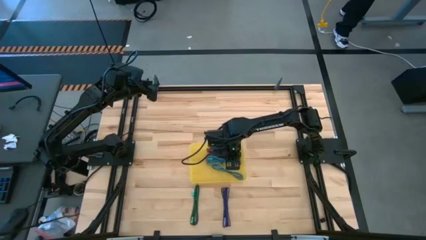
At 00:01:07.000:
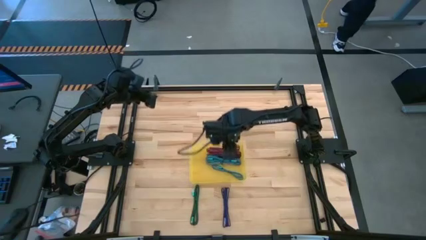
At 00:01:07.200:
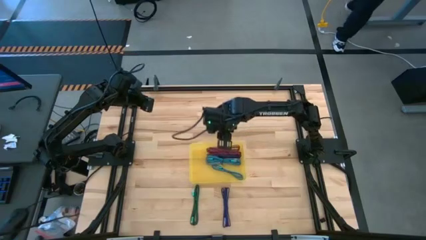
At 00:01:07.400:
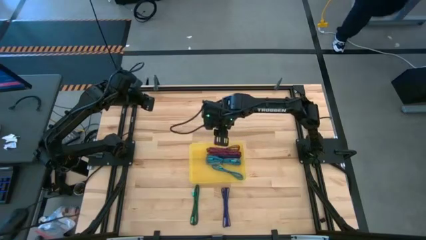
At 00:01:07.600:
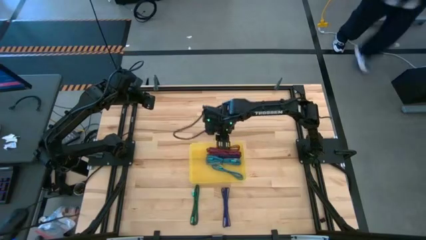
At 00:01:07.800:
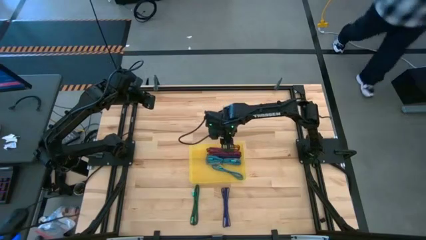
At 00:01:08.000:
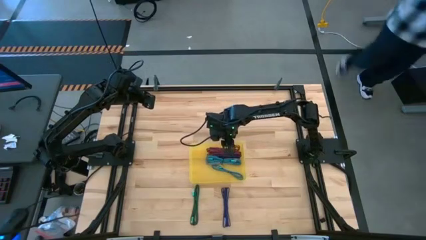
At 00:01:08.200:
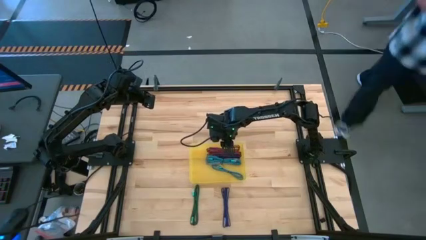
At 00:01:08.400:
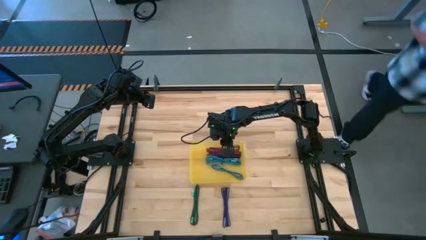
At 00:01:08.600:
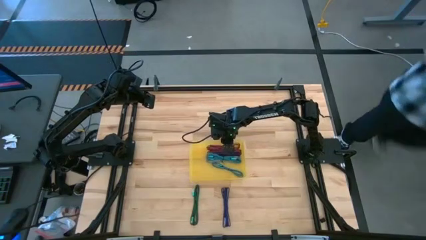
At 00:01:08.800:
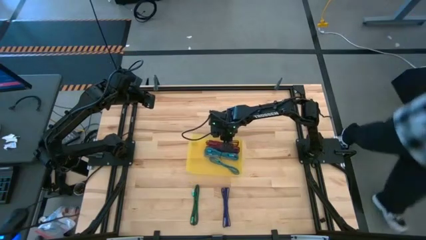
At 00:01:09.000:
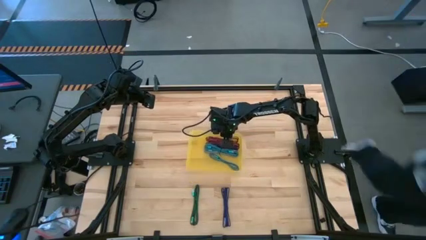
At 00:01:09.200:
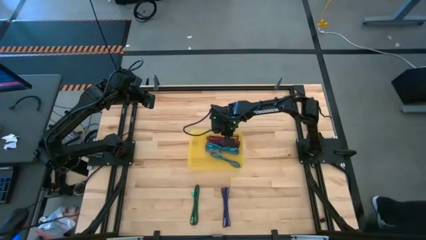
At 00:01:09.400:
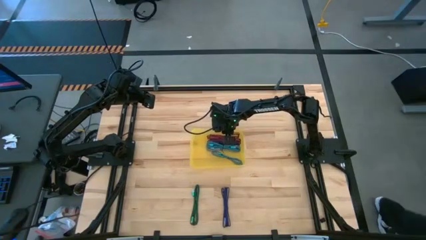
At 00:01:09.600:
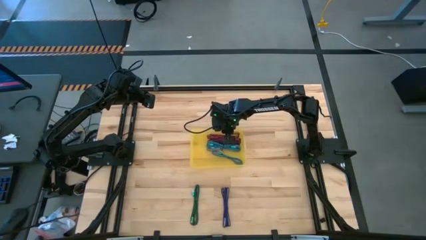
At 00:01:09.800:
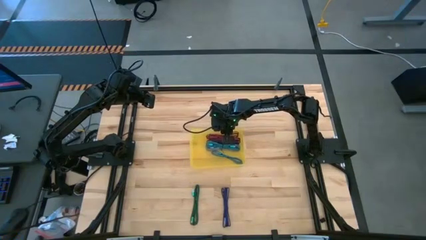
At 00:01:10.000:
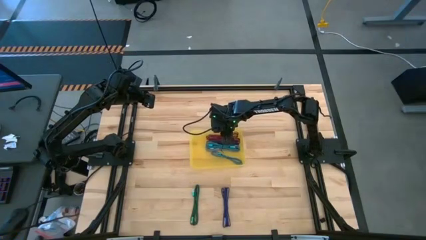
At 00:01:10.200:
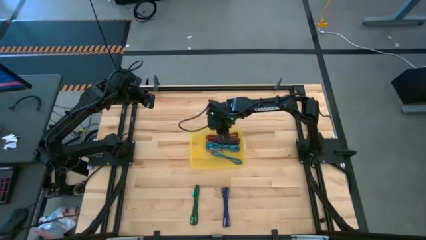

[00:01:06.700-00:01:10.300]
Task: Pick and place USB-C Cables
Adjust the yellow bin

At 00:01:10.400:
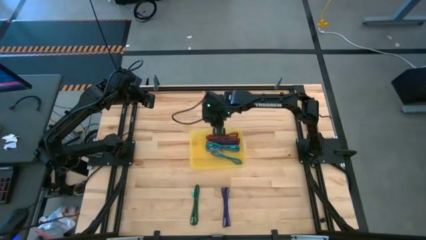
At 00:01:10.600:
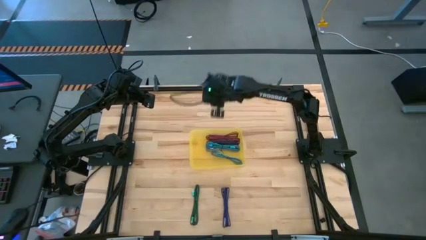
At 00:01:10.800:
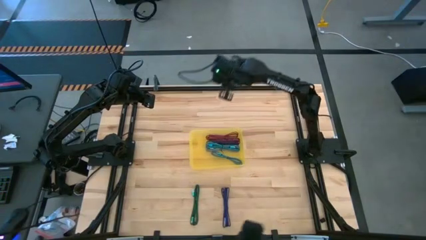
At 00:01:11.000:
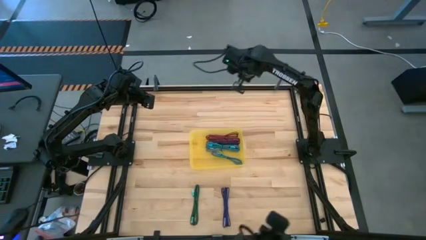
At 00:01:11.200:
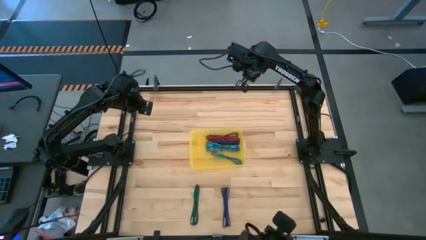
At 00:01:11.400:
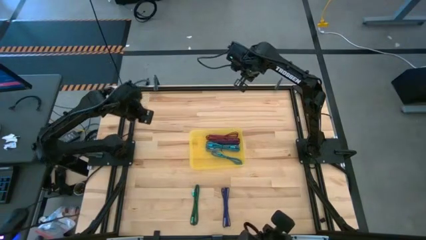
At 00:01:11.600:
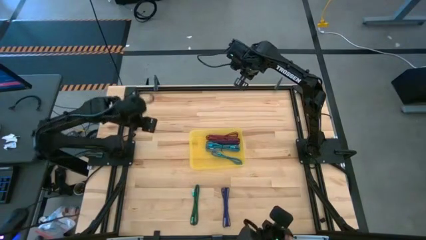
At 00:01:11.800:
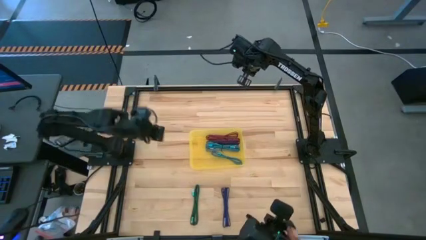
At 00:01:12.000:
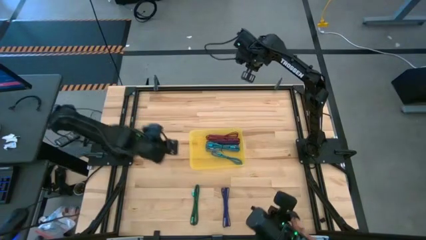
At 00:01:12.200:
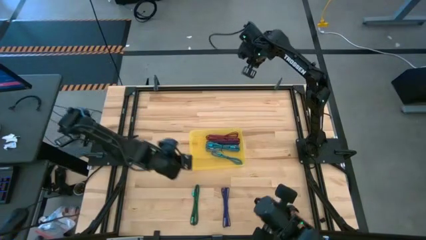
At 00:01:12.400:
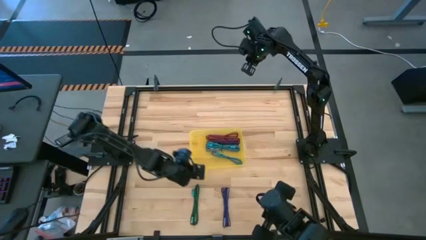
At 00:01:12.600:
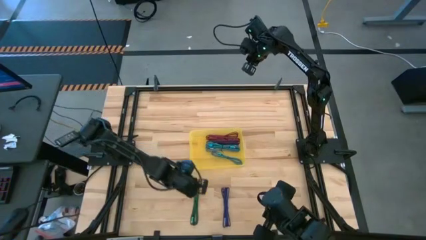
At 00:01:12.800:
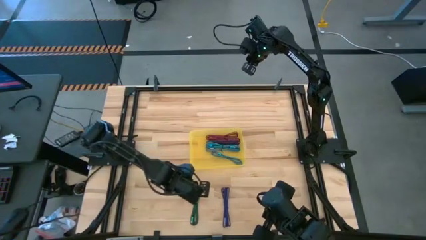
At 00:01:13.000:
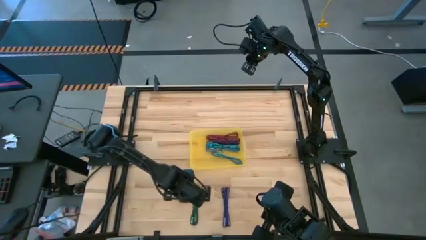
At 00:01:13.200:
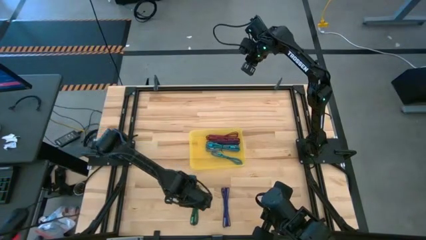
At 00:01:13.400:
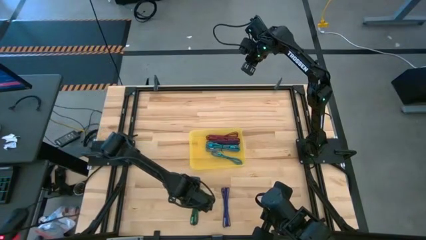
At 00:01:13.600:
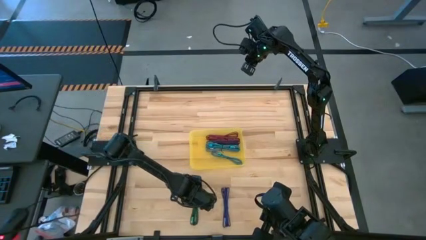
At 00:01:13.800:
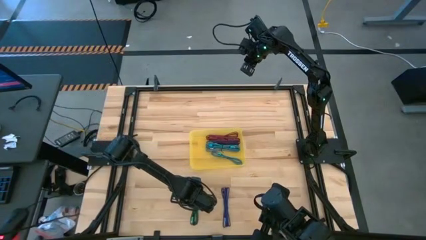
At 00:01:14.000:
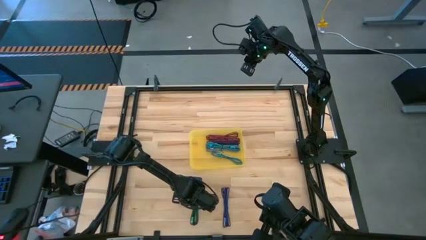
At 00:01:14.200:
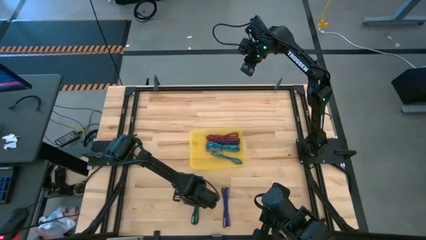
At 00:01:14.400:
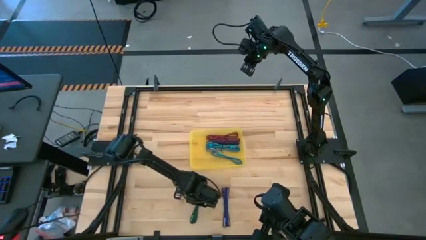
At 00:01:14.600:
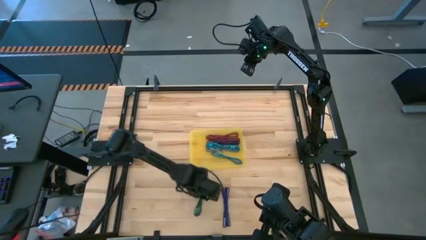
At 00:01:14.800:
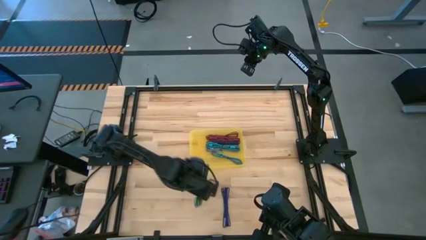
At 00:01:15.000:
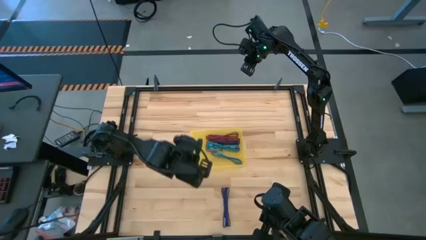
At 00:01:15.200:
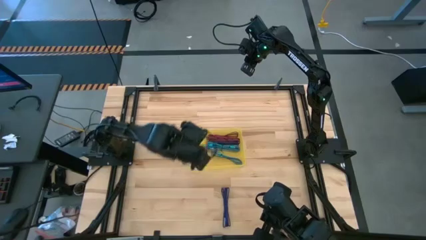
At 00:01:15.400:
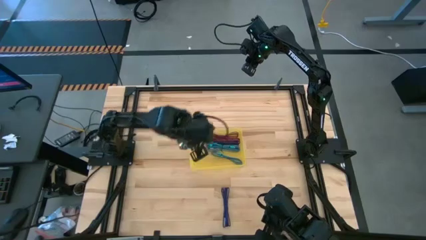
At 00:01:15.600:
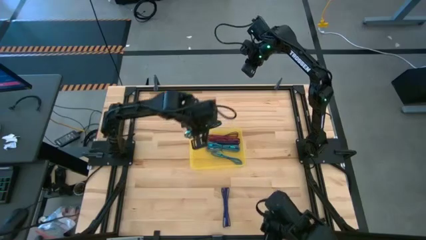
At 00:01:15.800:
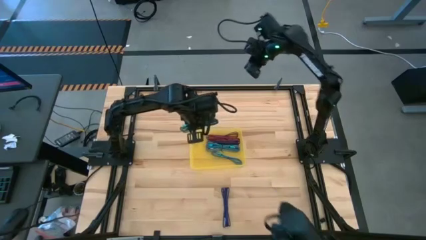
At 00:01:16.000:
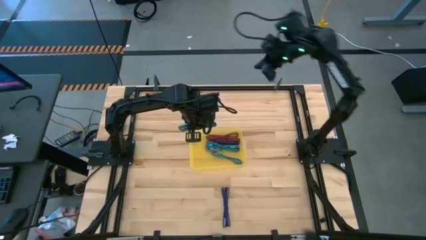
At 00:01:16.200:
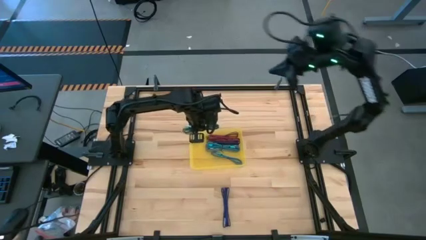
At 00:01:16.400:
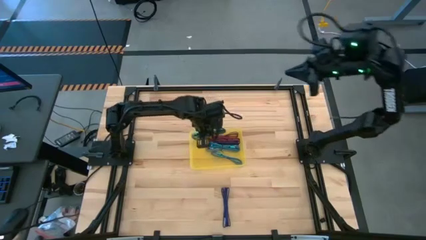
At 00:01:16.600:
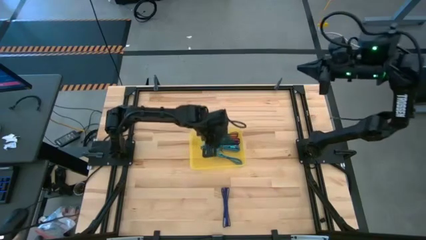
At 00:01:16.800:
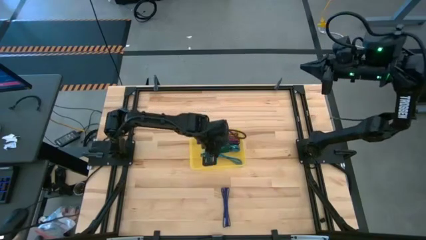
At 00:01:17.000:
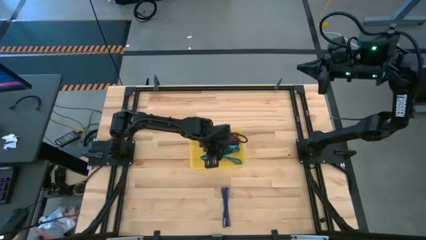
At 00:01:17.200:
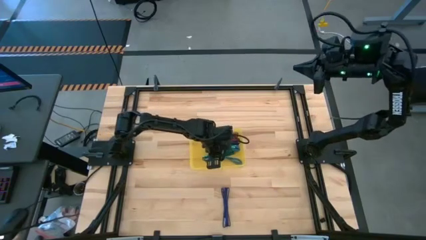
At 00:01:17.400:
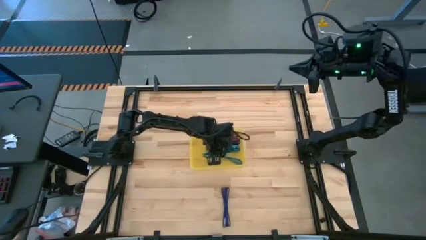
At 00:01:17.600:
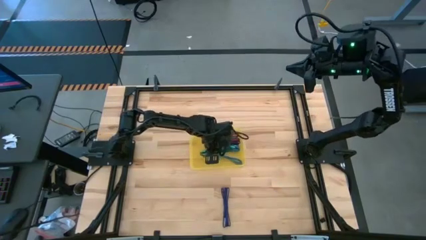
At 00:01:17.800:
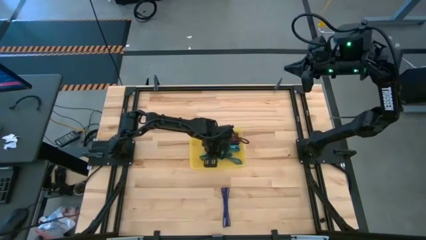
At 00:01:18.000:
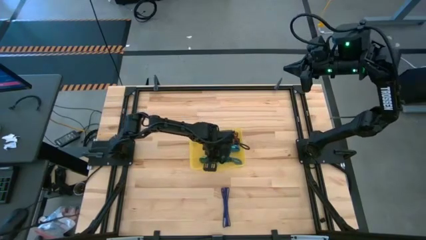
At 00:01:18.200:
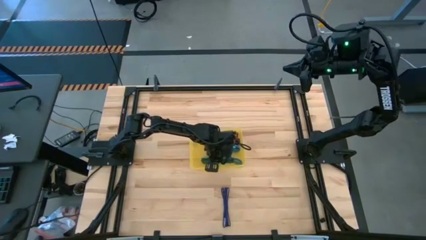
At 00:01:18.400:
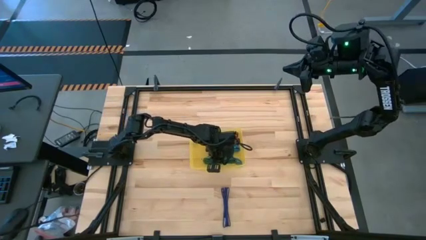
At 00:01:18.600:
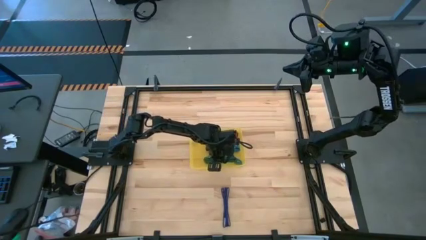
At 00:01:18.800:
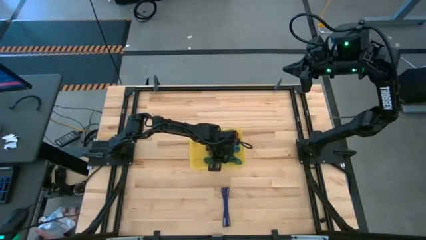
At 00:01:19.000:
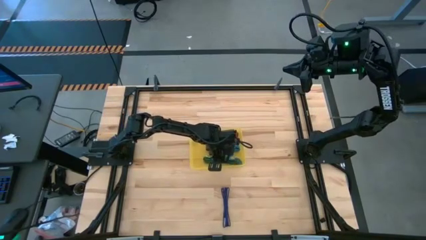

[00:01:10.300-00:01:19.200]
Put the green charger cable into the yellow bin

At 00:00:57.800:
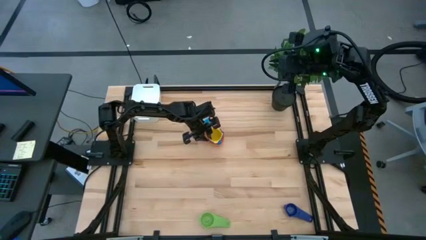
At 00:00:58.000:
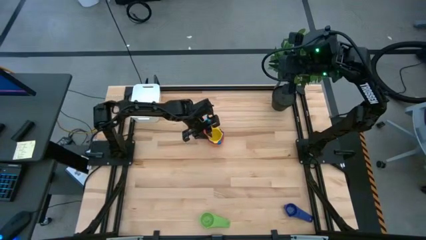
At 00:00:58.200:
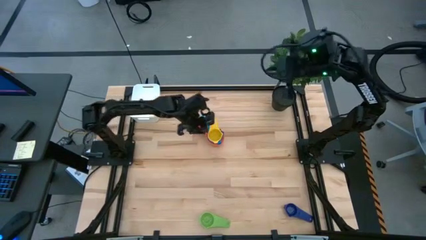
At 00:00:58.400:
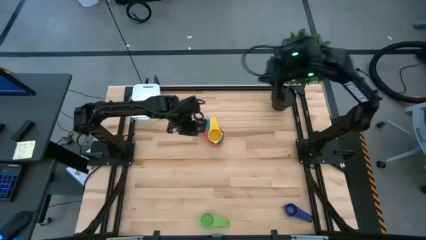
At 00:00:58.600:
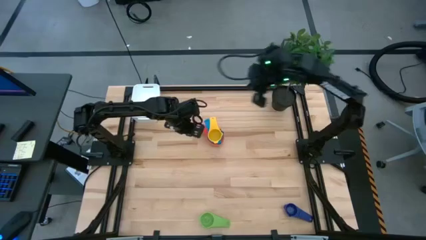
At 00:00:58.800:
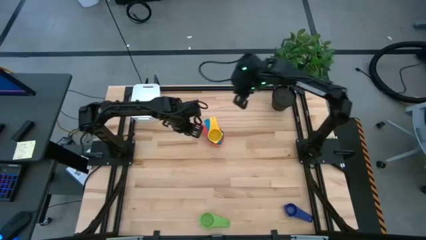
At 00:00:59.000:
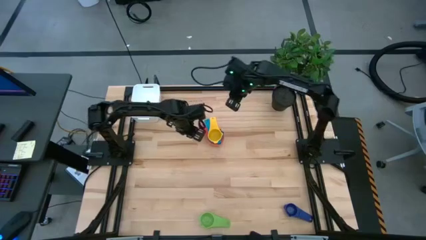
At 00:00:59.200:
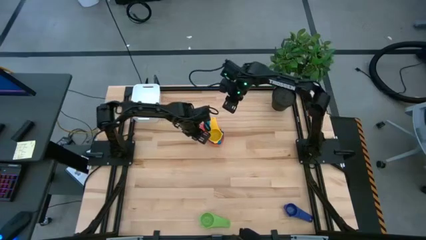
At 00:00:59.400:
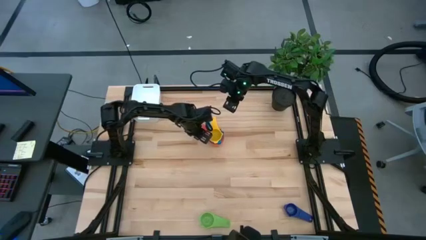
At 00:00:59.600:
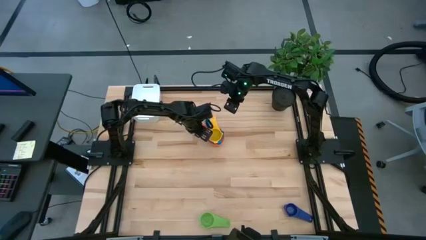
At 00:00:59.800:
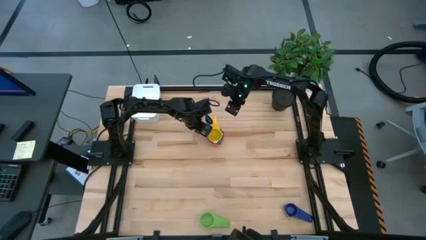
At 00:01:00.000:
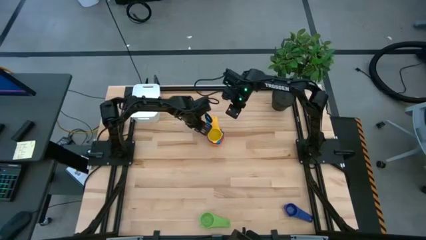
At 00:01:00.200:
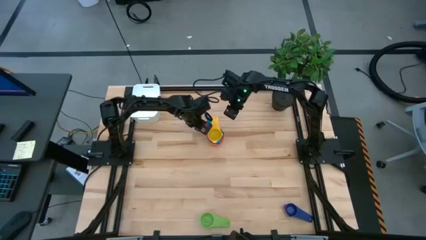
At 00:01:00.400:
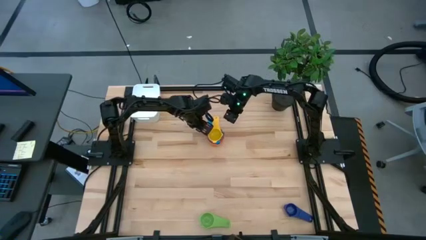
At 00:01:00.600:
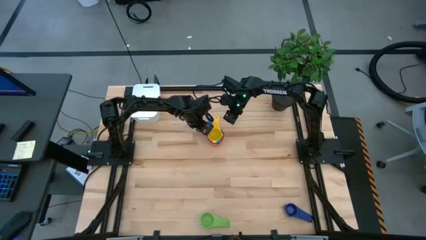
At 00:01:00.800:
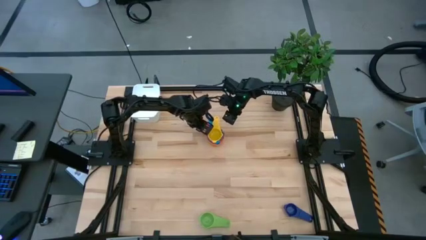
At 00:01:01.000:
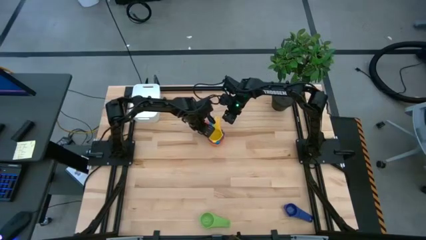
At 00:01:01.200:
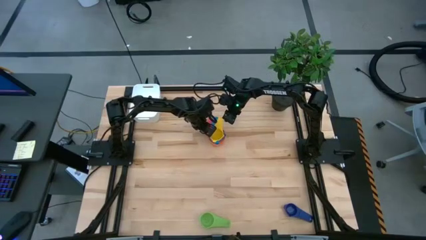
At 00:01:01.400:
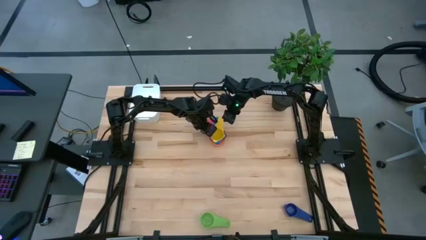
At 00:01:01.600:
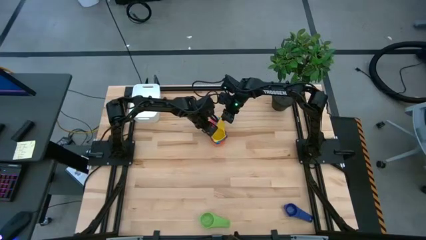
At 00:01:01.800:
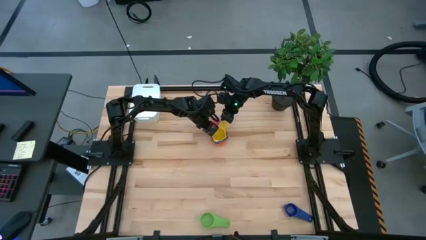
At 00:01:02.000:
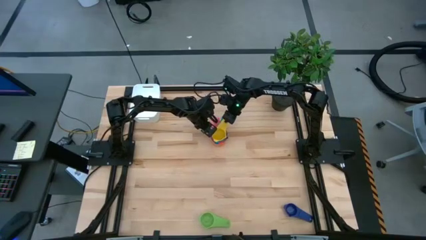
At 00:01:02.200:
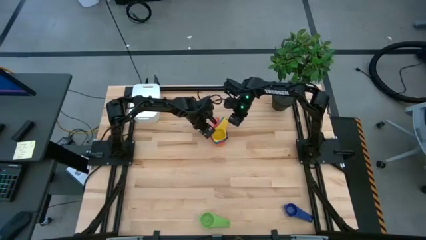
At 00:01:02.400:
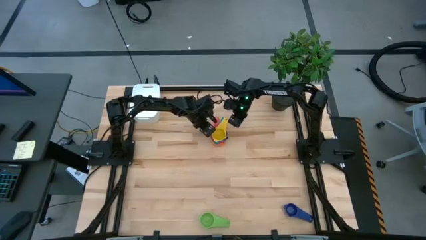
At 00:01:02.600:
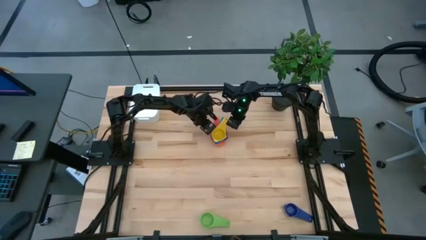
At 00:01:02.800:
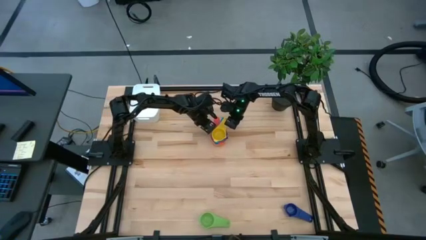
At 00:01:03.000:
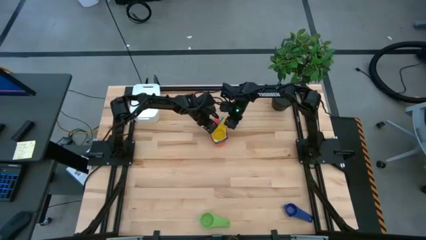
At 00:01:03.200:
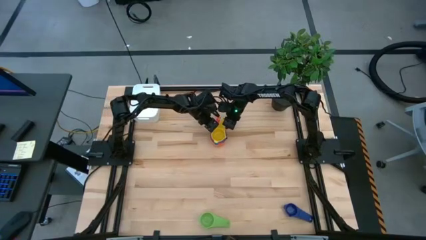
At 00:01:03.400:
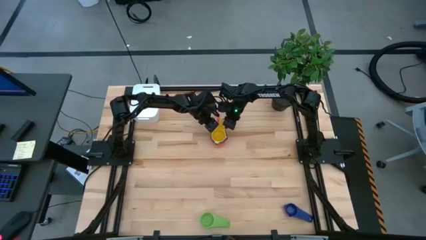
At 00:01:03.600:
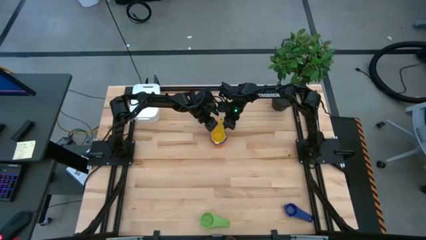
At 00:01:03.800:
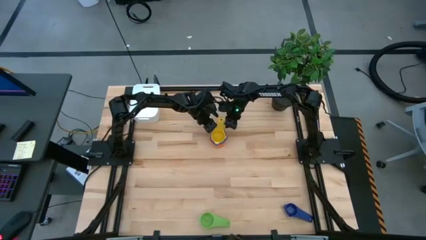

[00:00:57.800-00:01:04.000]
Task: Nest measuring cups in basket
Adjust the measuring cups
